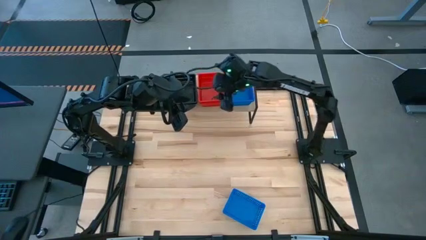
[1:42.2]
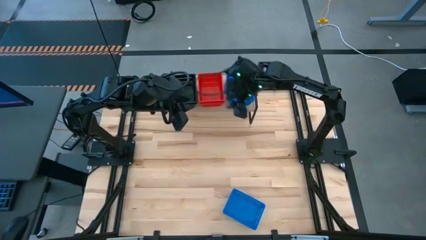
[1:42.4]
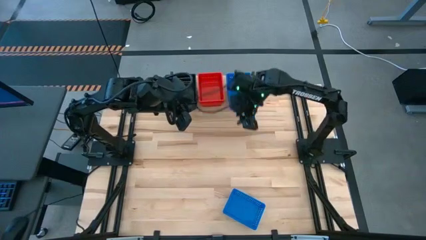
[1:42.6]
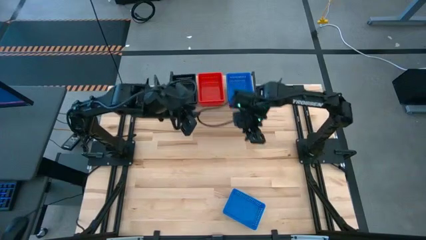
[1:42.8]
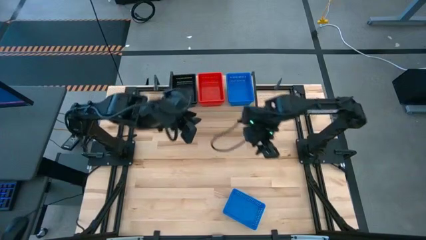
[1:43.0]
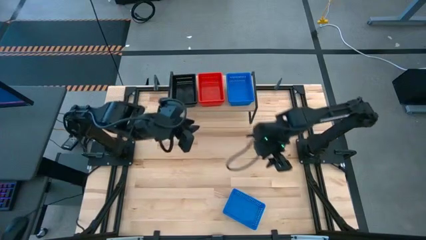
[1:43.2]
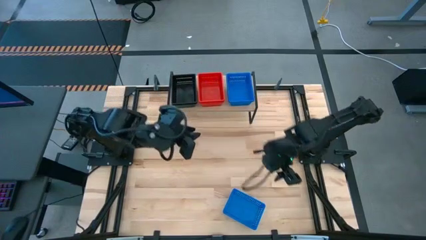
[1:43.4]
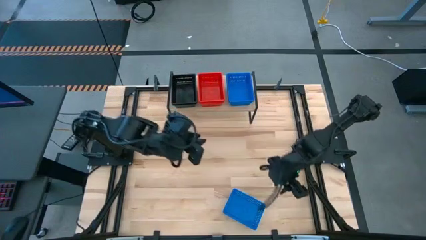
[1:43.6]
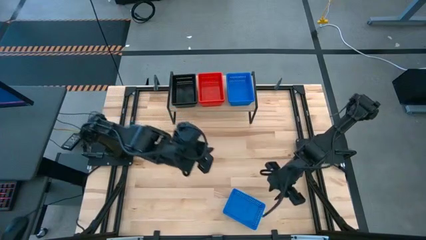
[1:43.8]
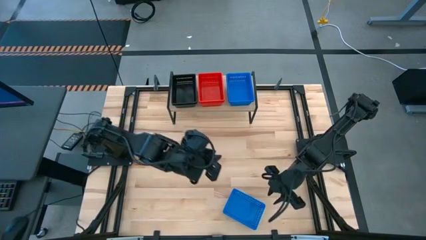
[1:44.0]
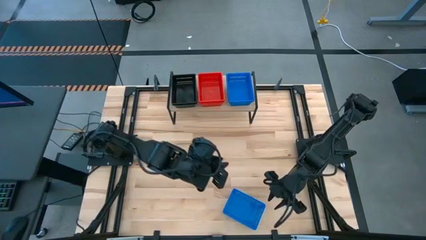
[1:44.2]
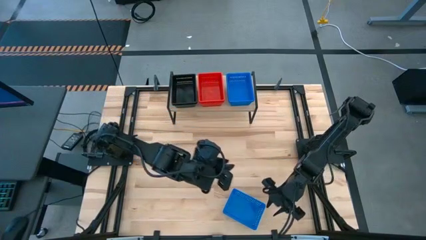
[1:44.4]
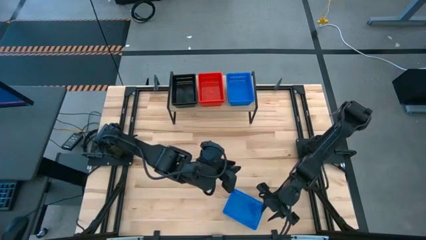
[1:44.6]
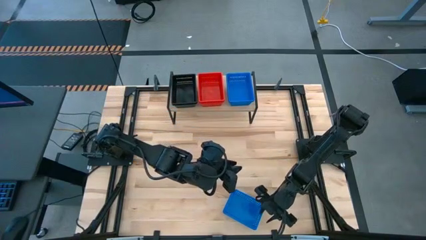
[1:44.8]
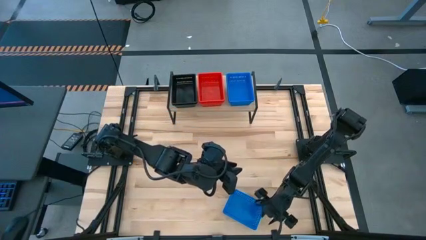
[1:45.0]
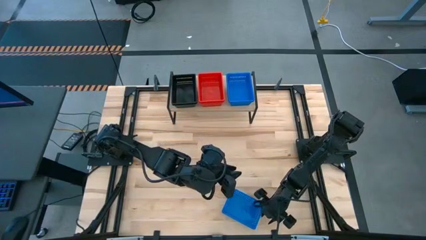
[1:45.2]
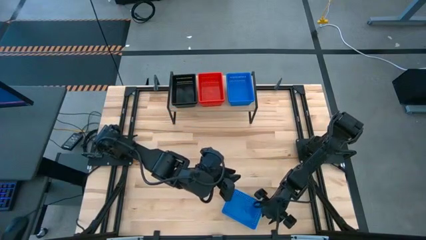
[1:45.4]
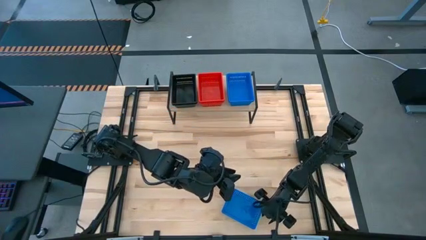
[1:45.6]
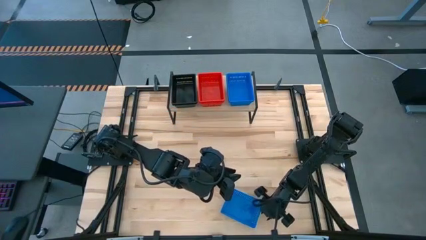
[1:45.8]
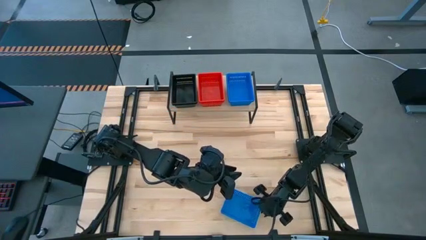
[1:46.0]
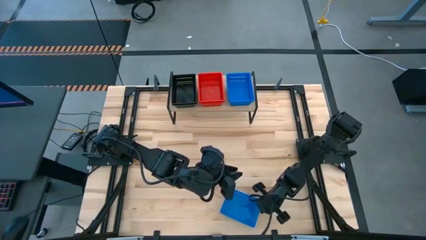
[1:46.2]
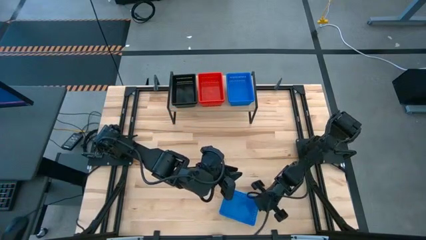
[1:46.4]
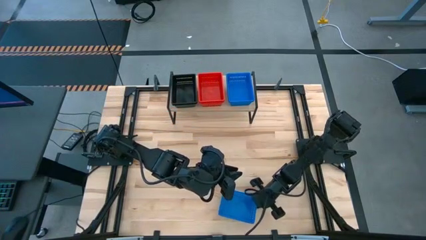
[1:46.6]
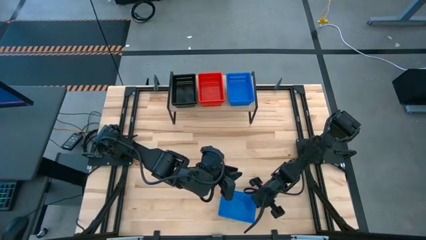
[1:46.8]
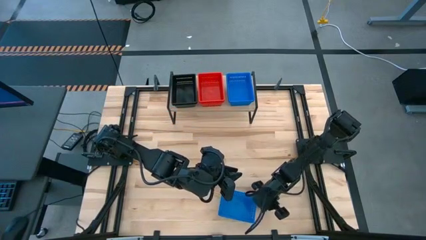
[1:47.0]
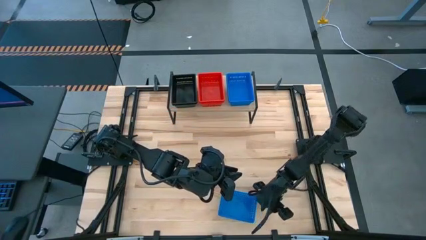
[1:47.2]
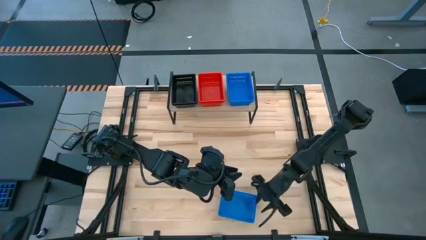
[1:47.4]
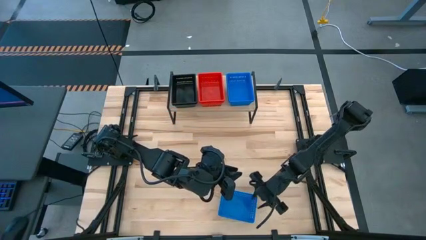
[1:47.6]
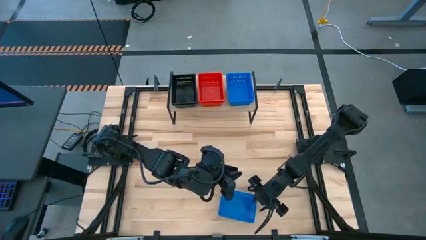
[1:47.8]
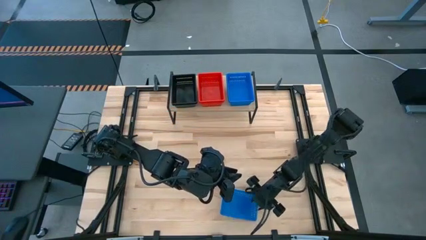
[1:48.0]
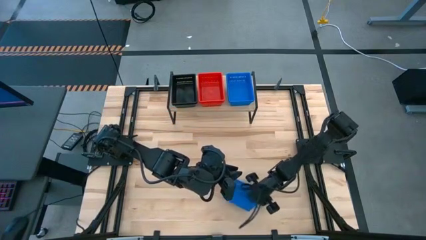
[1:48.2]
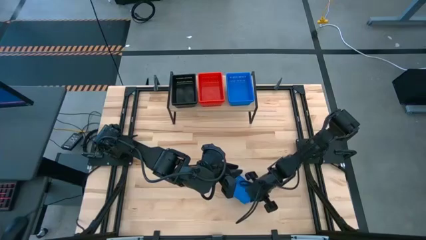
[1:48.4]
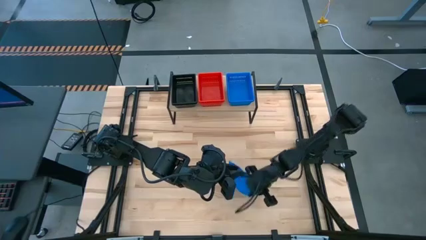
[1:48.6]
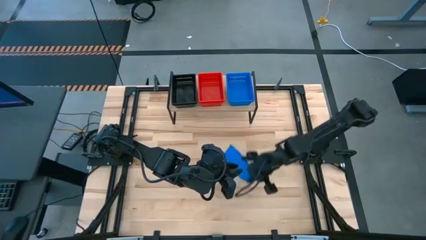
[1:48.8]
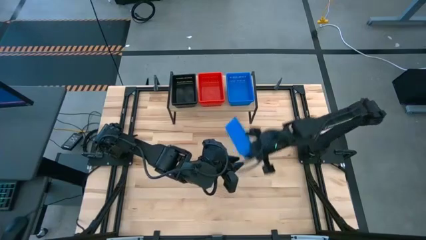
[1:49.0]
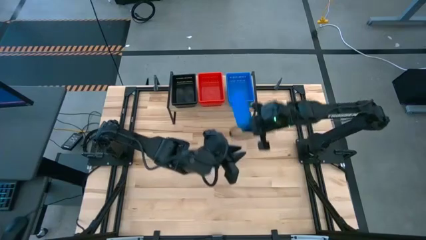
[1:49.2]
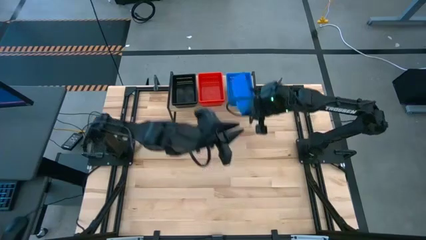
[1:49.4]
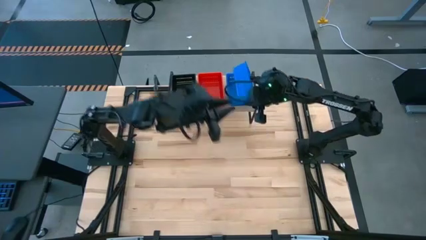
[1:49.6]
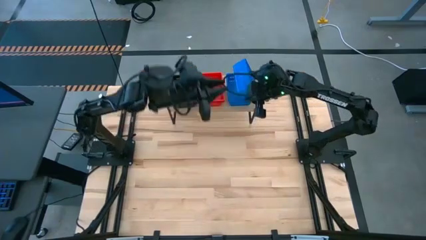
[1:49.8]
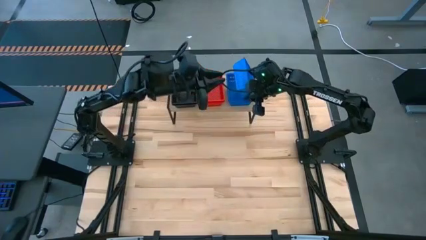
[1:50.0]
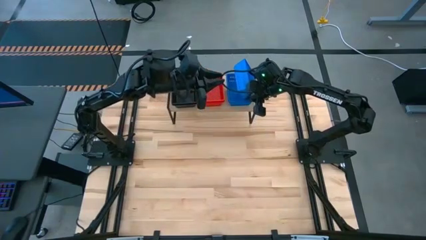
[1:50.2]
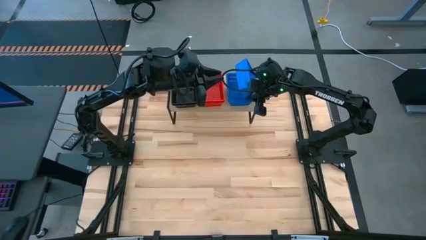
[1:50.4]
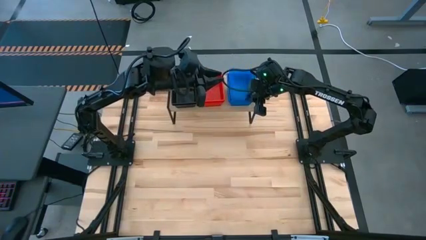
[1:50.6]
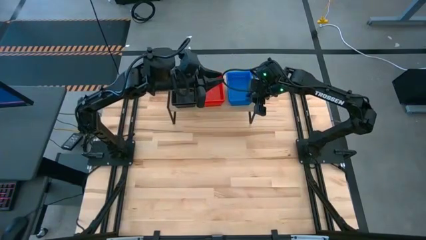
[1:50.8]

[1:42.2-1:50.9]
Task: Stack baskets on shelf by color
Stack the blue bin on the stacked blue bins on the shelf

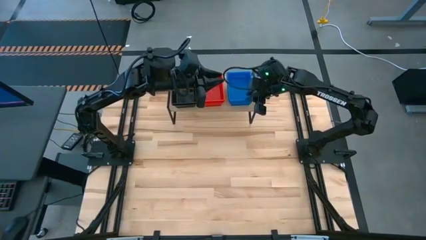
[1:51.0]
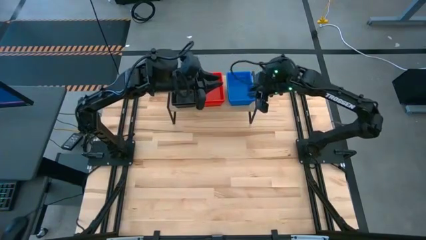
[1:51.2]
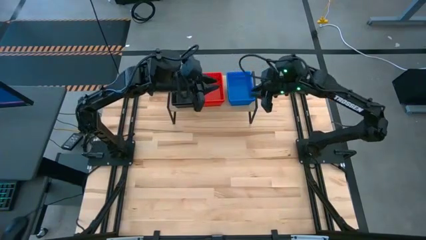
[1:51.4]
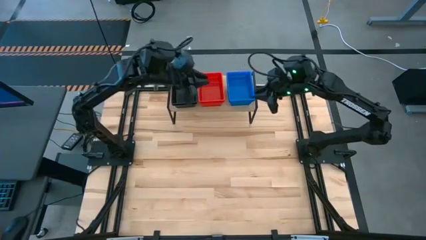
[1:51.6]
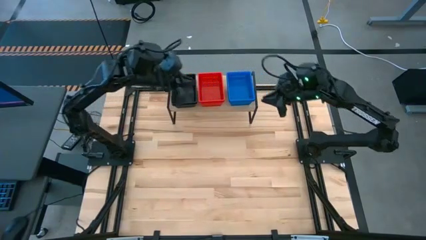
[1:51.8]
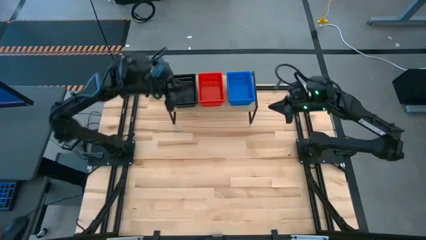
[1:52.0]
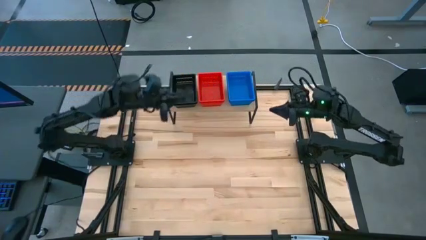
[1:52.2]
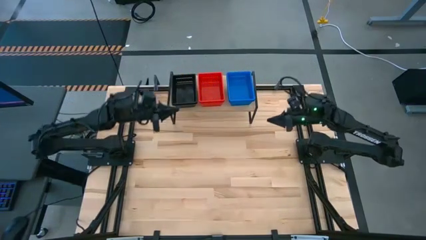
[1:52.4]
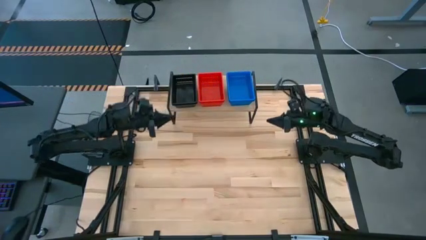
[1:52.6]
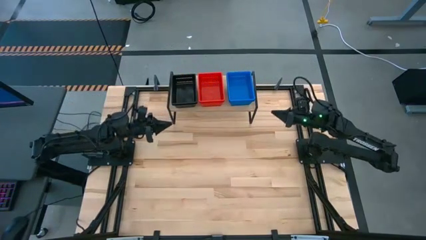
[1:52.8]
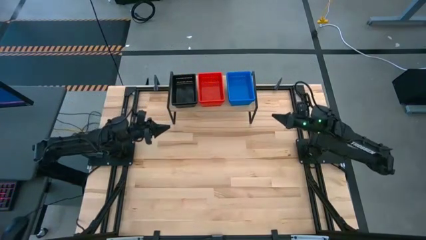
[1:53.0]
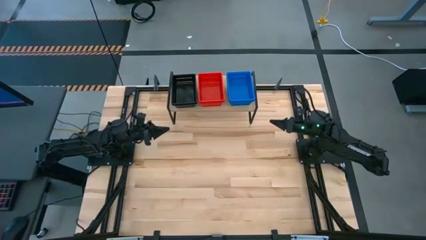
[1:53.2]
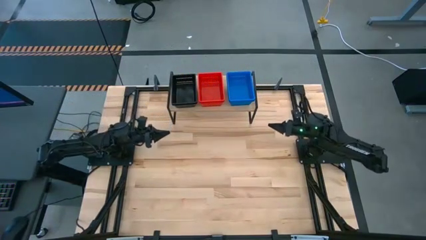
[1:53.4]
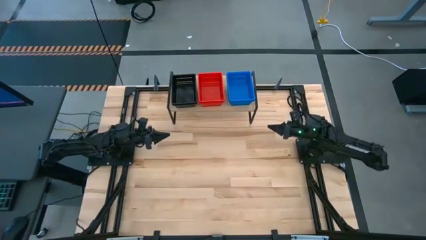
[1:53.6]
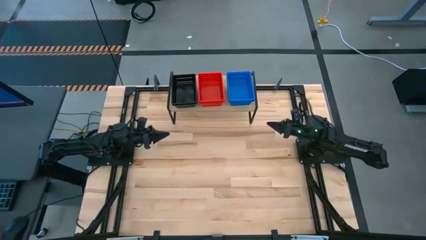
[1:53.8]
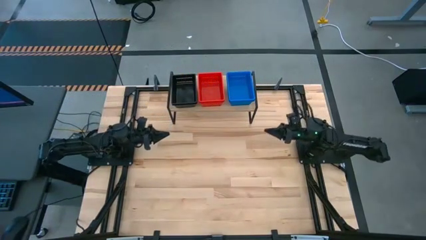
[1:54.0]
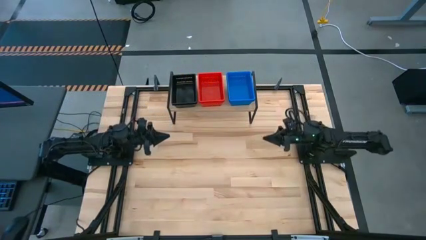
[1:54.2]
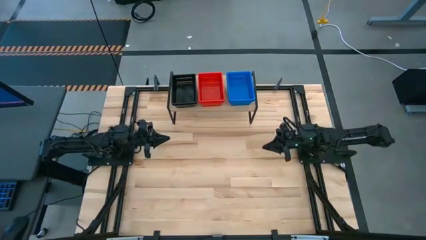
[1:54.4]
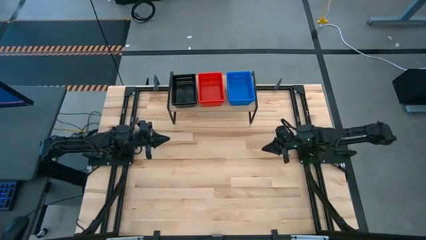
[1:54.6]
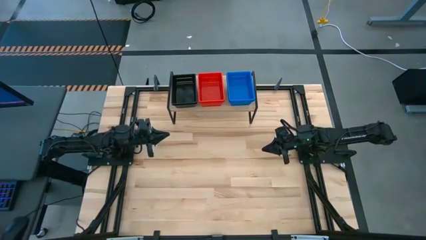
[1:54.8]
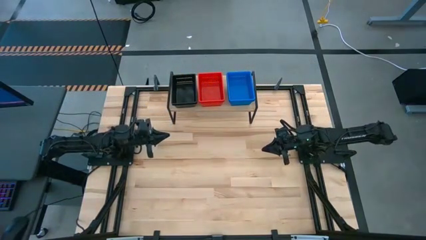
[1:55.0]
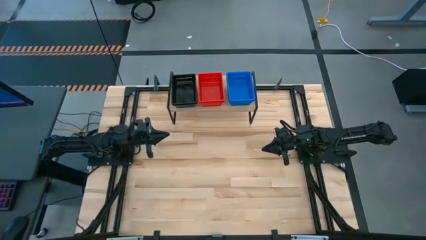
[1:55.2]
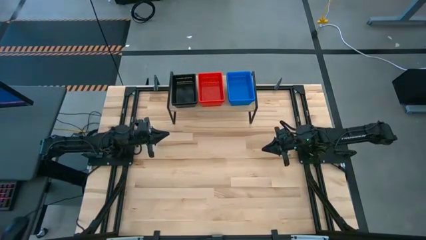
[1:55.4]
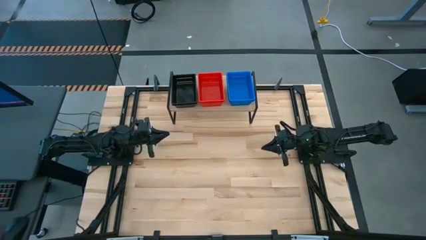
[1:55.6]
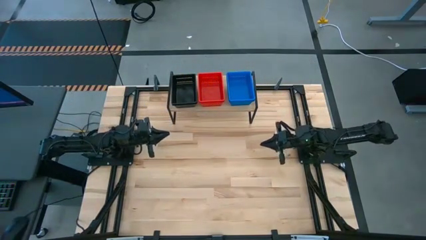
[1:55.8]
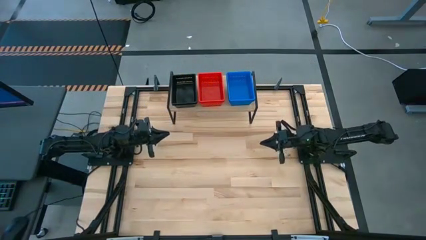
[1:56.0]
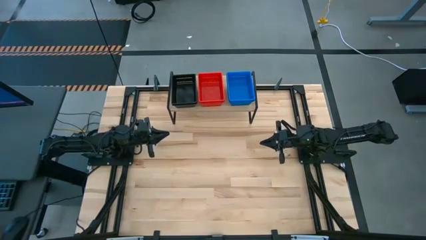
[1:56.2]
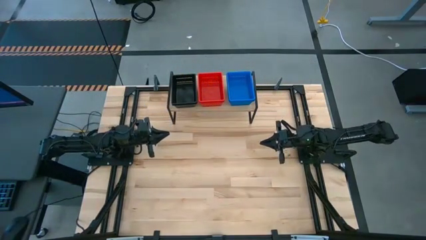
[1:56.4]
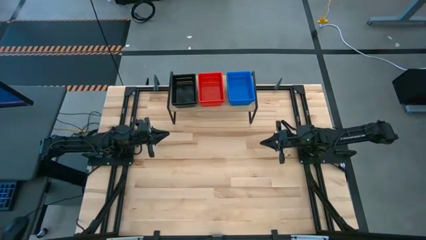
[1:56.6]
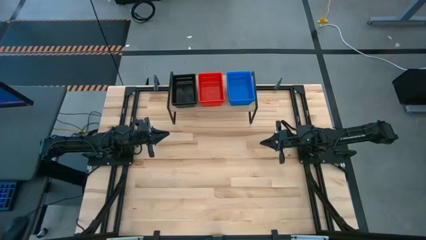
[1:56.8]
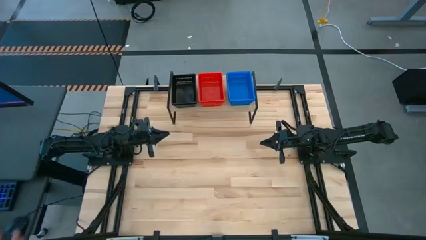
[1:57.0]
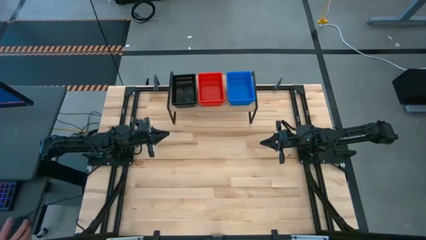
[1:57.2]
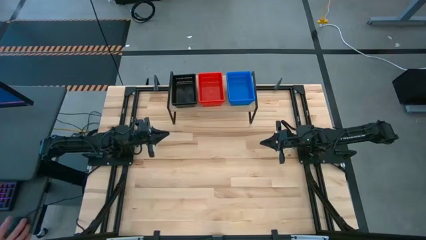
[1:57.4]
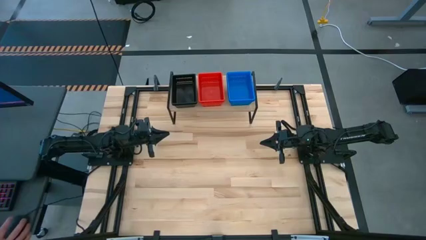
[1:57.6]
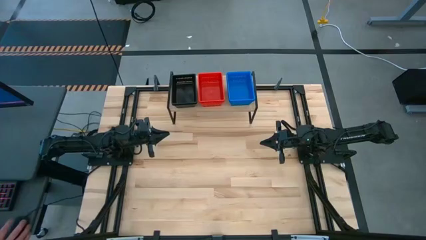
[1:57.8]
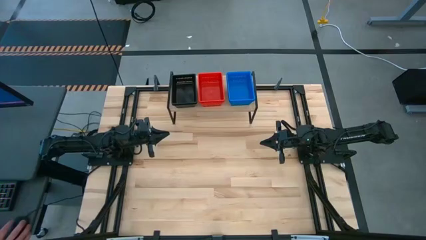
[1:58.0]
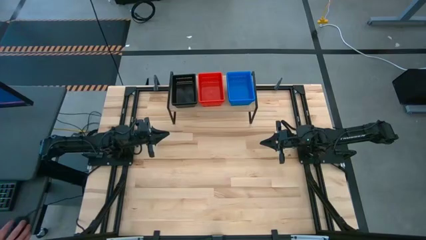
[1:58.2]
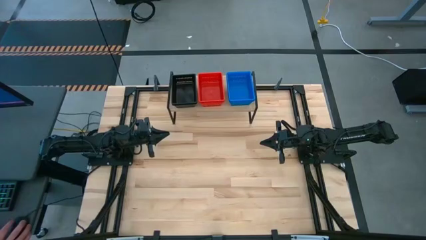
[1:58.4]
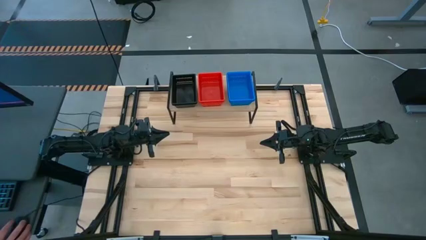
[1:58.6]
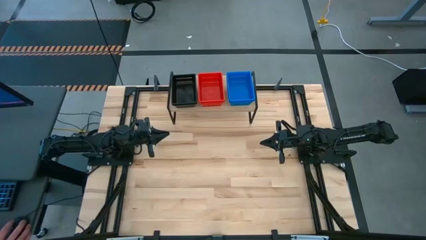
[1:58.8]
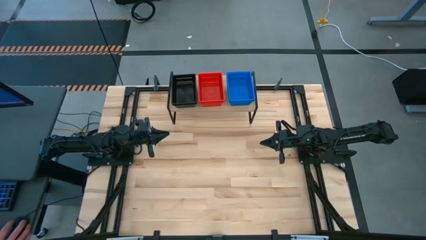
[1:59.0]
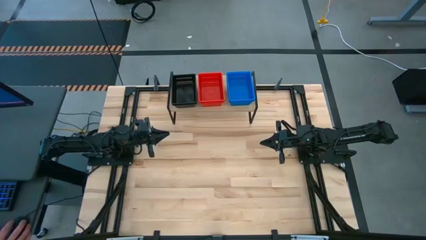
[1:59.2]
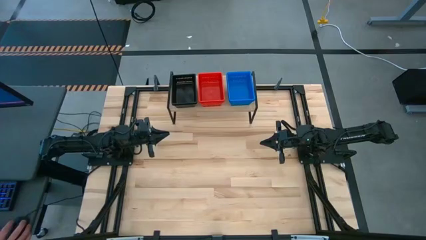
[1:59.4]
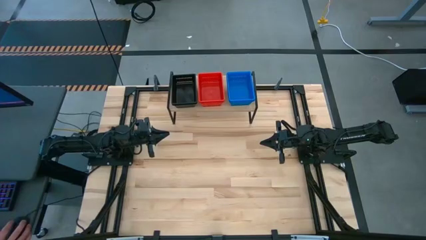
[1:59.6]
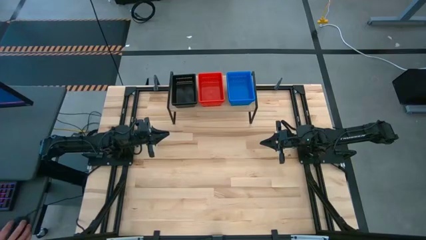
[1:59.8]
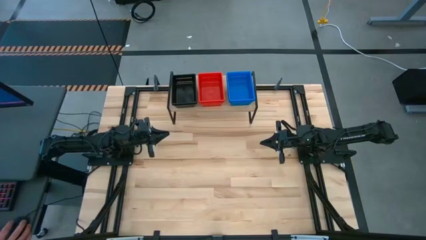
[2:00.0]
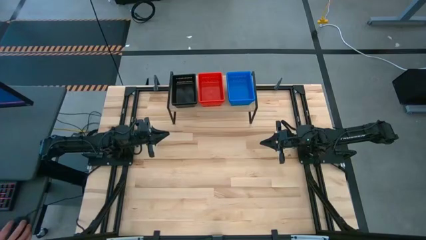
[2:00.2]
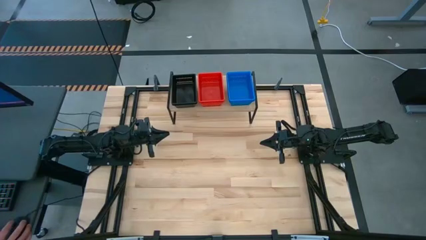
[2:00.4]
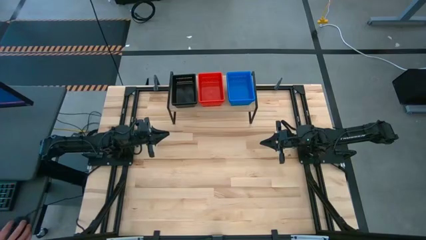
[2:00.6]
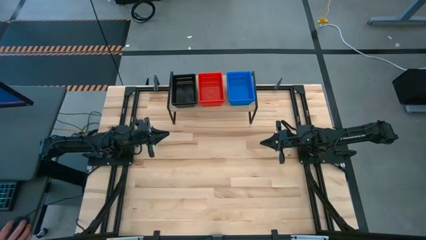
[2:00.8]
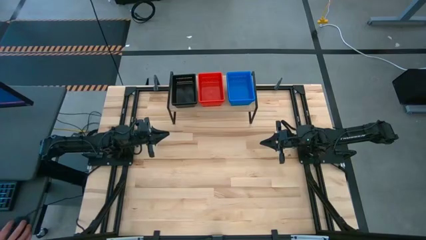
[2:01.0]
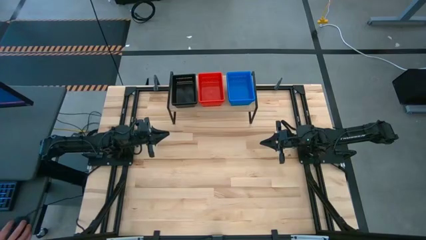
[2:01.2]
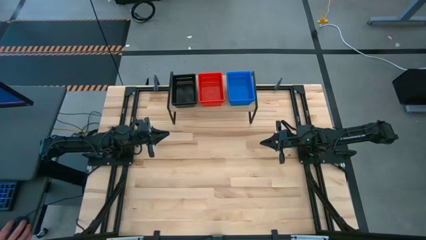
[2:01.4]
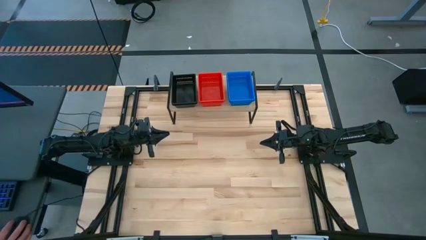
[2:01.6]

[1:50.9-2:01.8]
Return to Home Position
